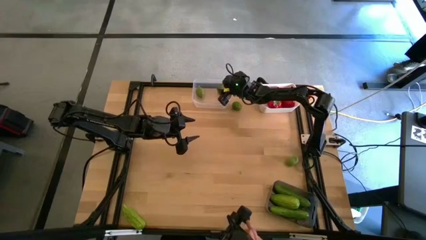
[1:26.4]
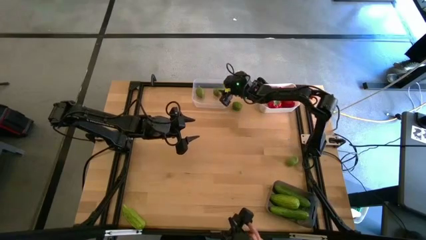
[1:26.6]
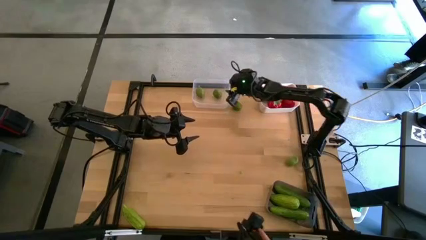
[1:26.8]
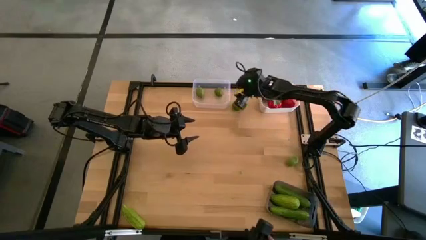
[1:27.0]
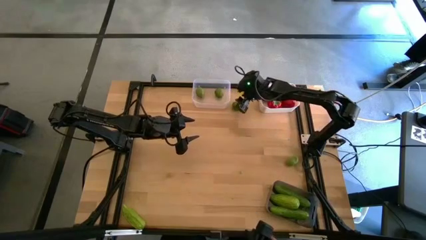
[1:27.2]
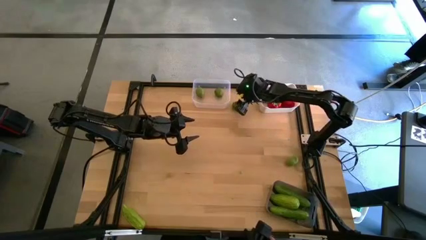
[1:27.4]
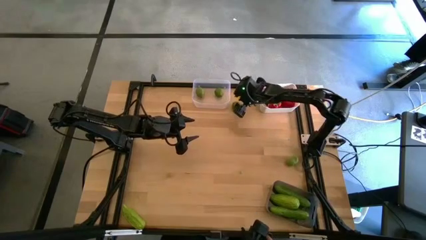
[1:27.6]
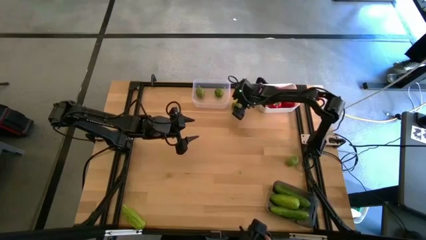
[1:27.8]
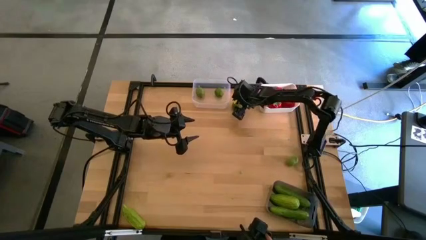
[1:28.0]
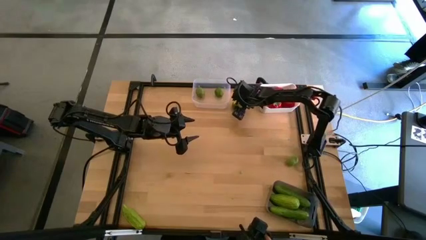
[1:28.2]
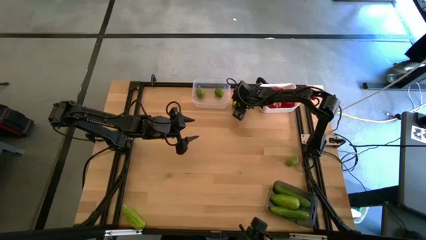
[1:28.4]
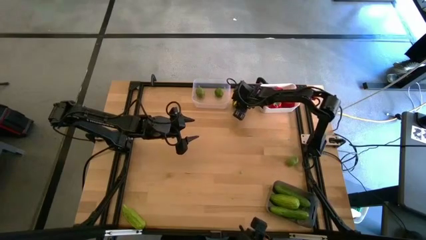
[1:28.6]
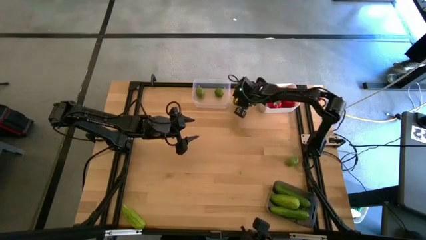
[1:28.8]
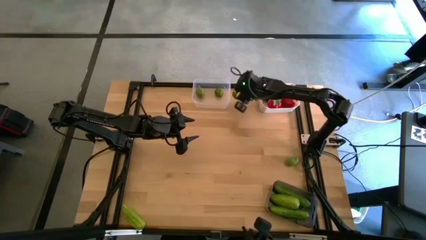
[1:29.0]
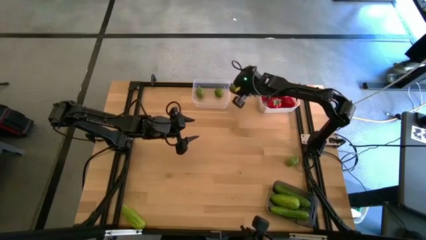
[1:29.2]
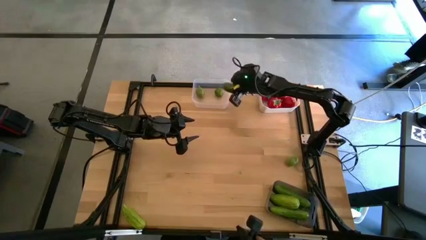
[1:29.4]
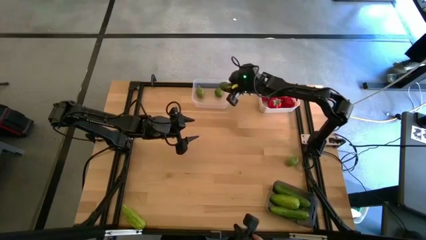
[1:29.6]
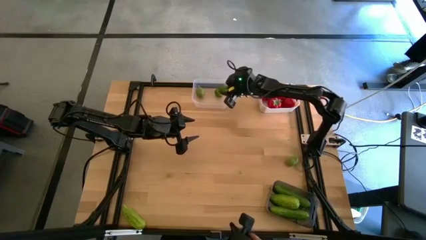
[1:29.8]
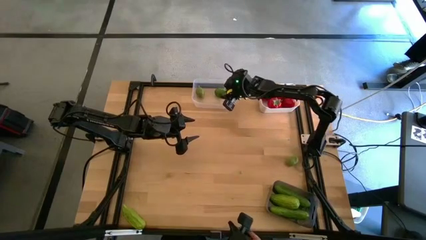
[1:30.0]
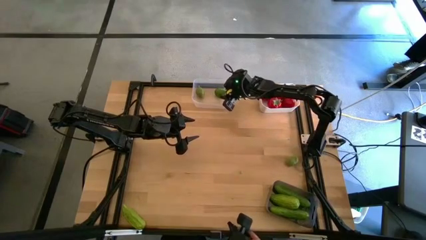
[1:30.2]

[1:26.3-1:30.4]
Task: Sort produce into baskets
Put the green lime into the transparent bin

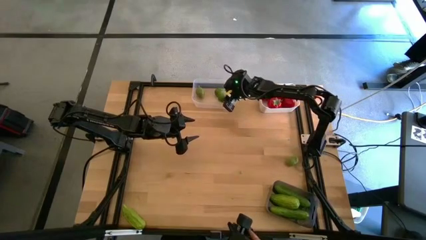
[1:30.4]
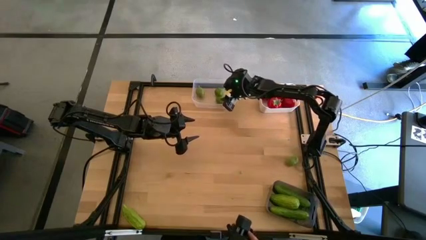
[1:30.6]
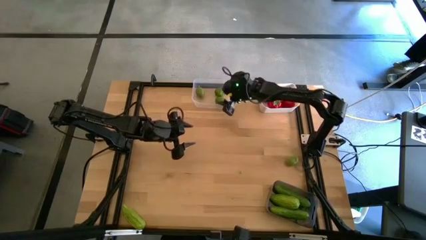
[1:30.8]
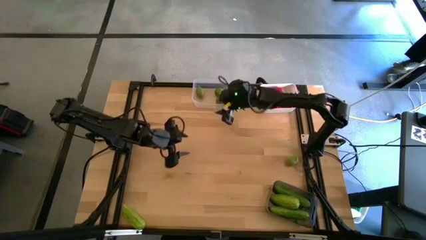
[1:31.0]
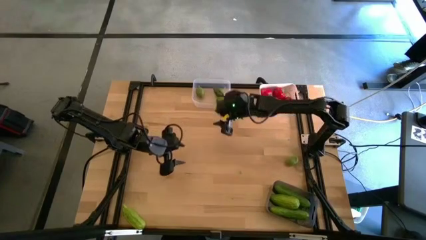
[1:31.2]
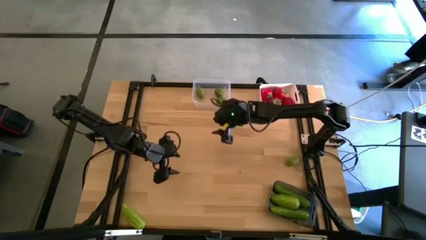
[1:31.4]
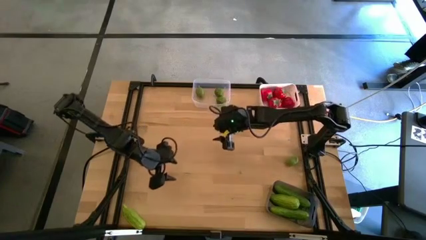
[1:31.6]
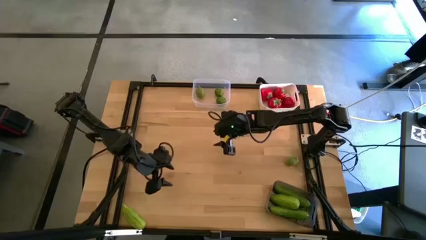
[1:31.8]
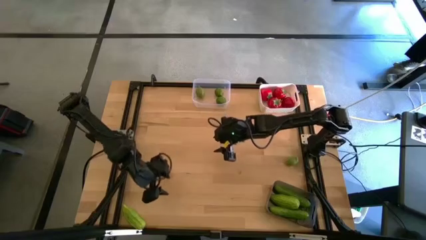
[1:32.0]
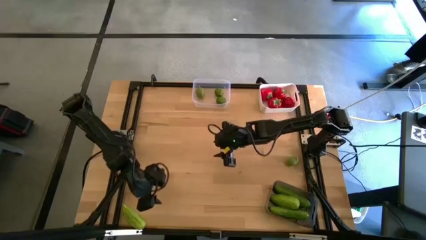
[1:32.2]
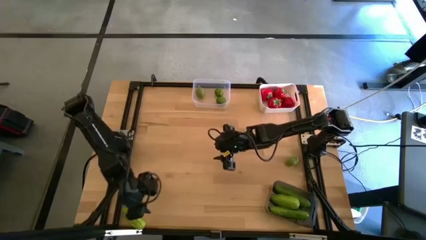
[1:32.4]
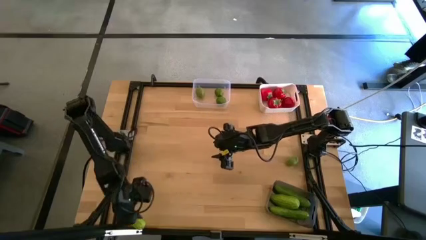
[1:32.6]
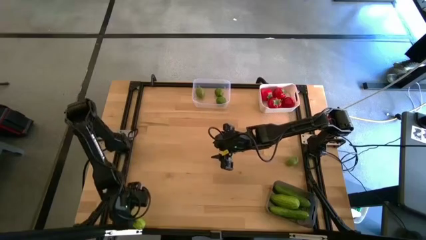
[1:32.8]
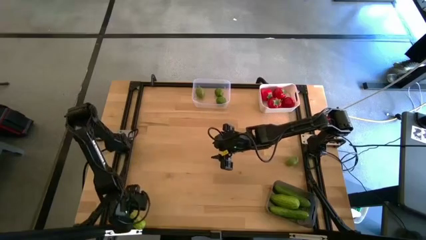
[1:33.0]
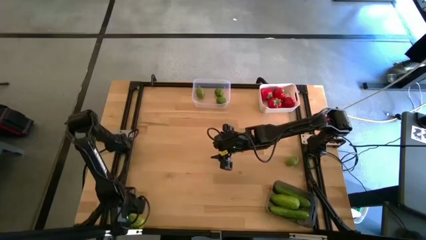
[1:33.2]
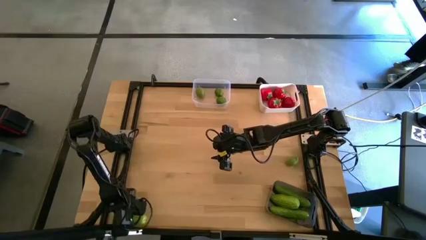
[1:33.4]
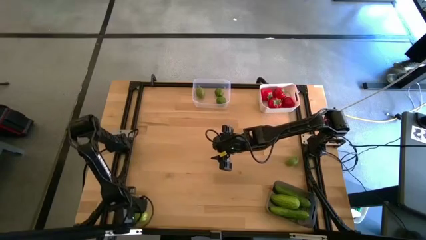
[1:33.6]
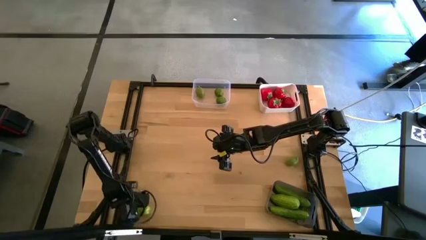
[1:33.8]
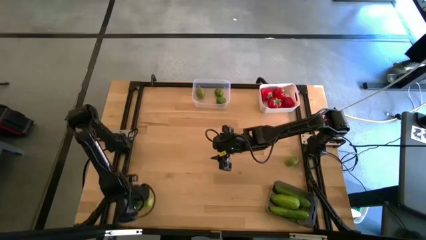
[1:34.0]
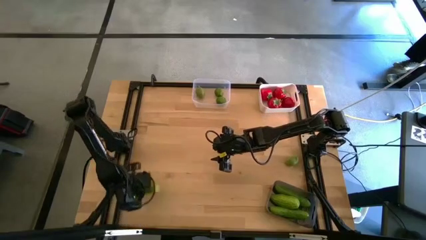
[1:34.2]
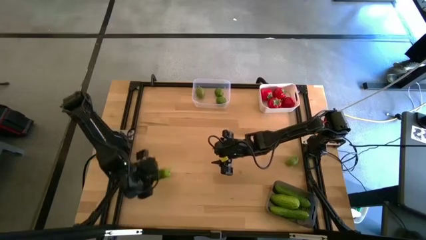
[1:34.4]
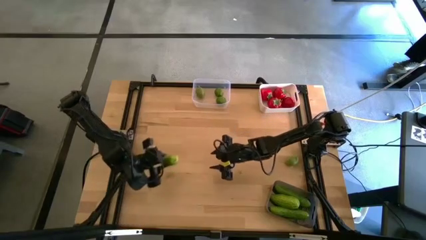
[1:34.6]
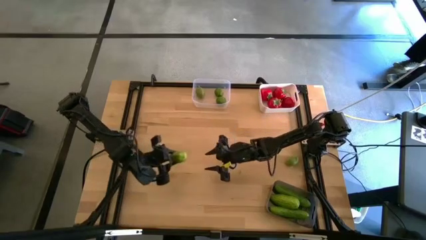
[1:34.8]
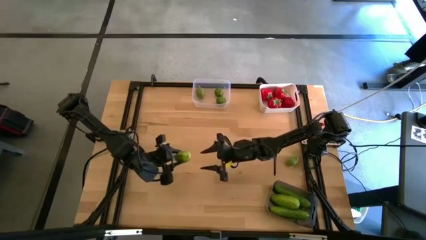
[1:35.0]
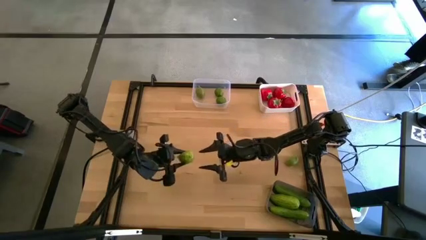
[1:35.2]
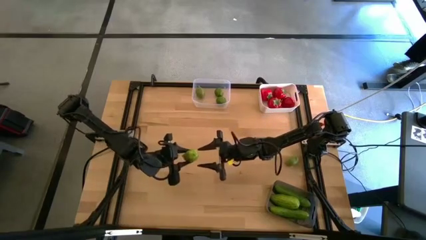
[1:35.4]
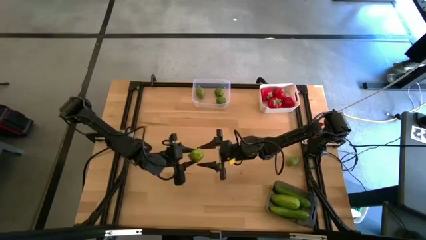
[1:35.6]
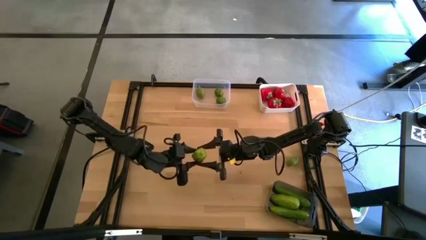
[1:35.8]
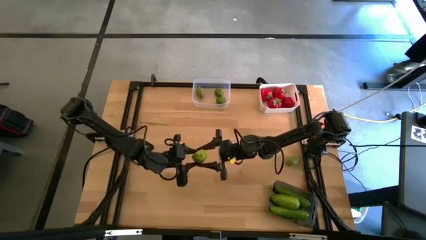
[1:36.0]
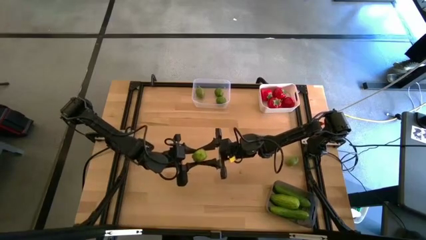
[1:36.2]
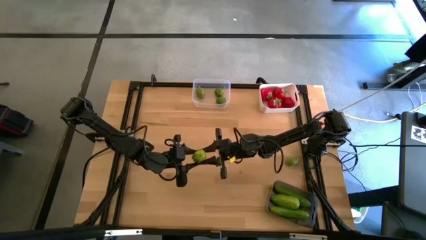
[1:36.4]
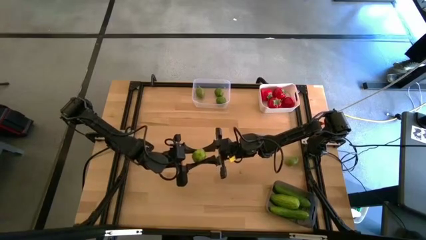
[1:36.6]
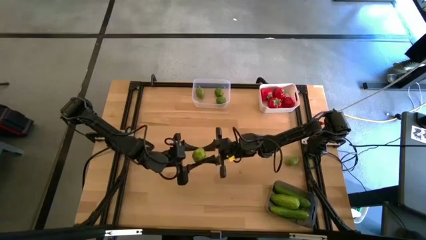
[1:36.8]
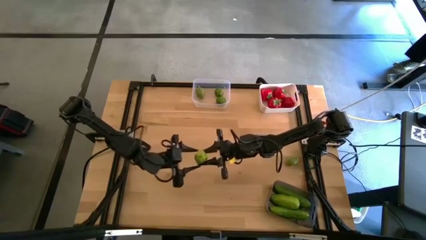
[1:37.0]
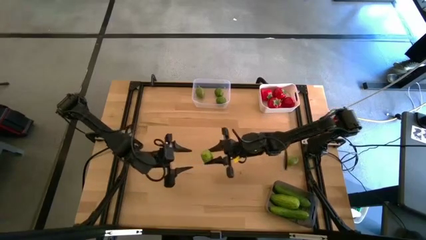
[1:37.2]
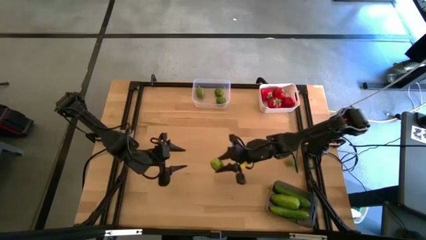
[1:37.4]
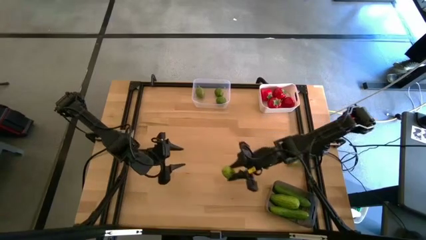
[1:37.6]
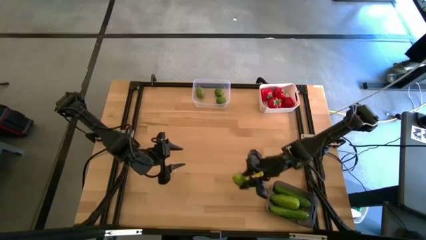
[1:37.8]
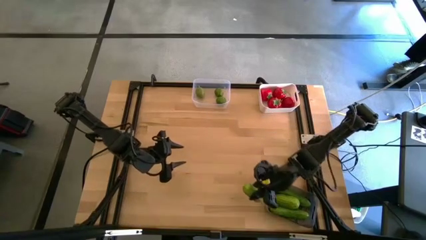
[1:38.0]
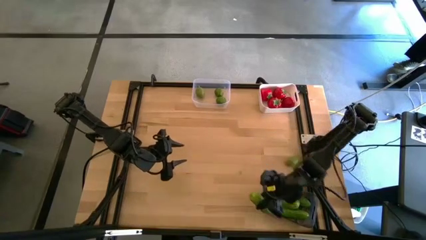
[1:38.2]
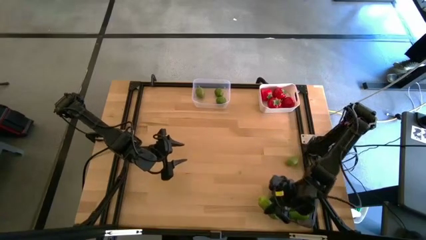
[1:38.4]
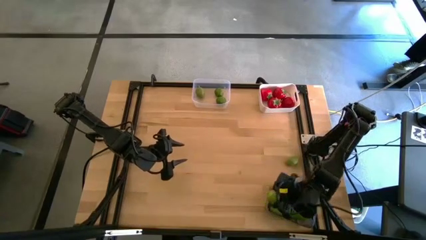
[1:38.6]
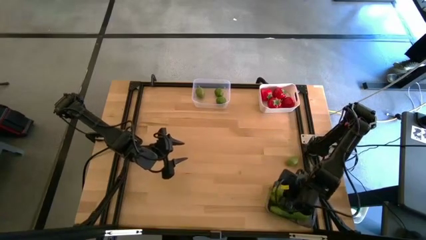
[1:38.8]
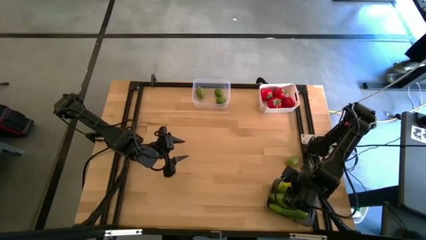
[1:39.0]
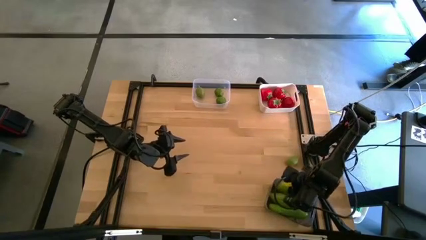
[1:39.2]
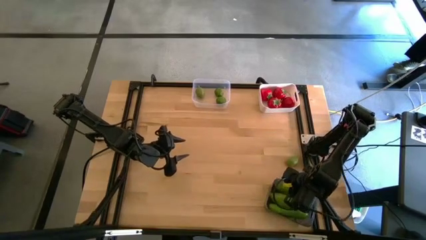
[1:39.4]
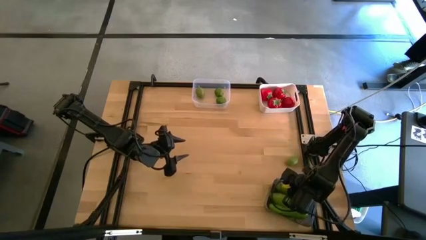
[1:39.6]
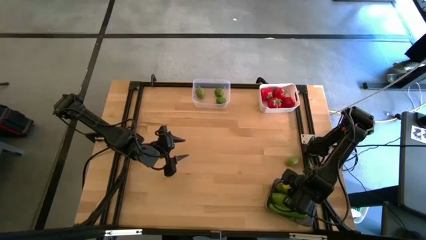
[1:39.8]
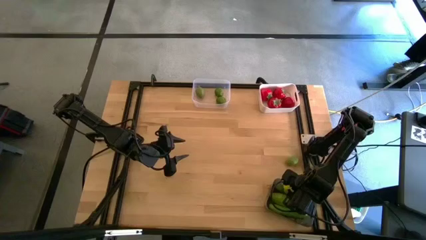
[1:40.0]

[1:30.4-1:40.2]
Put the green cucumber into the black bin

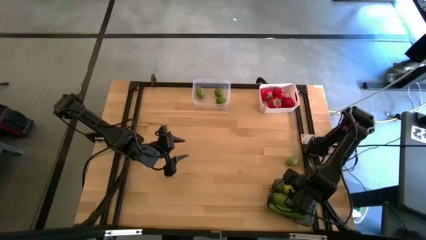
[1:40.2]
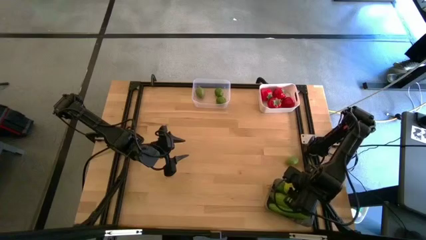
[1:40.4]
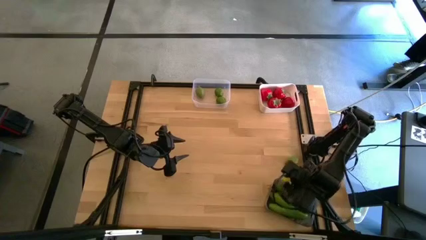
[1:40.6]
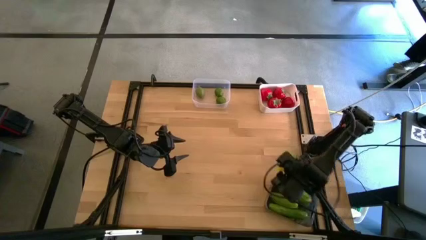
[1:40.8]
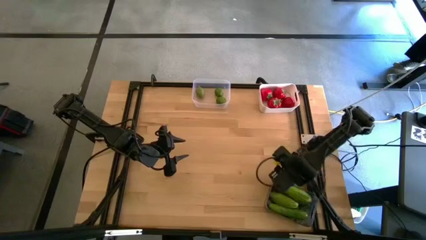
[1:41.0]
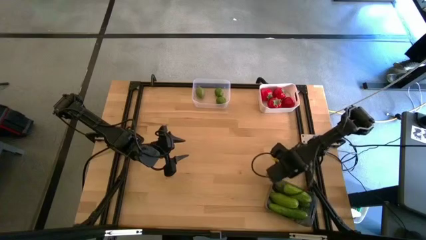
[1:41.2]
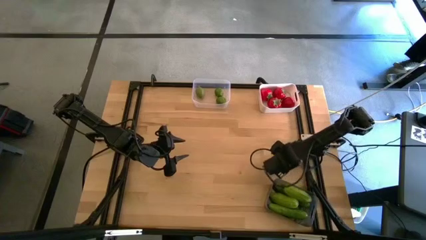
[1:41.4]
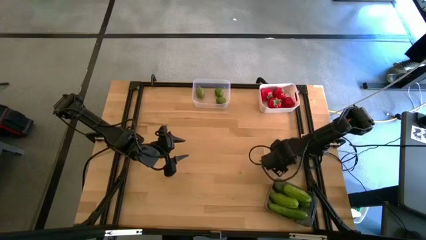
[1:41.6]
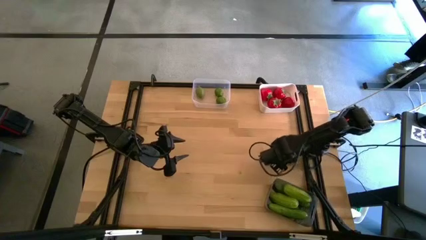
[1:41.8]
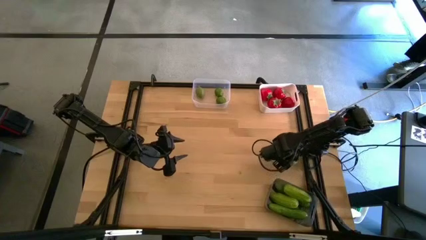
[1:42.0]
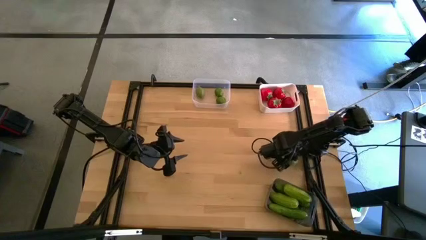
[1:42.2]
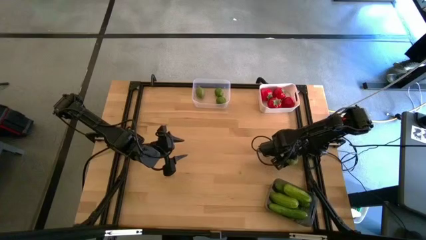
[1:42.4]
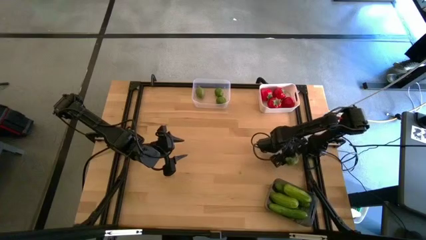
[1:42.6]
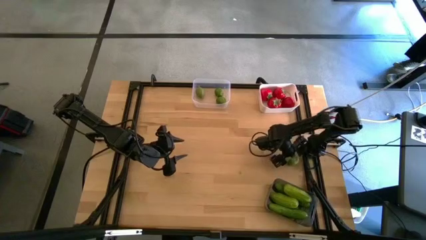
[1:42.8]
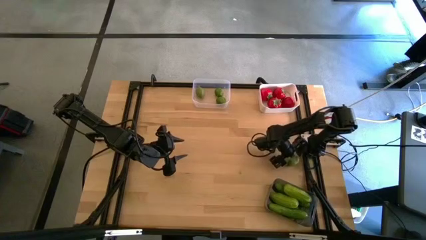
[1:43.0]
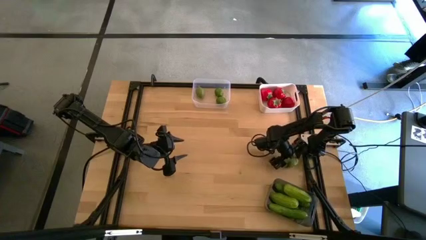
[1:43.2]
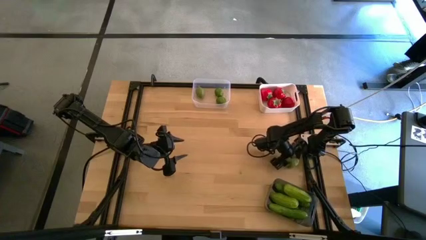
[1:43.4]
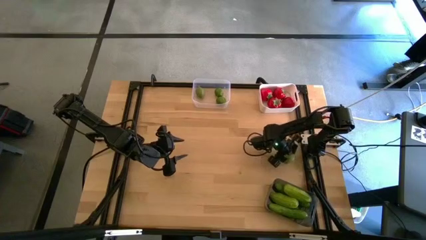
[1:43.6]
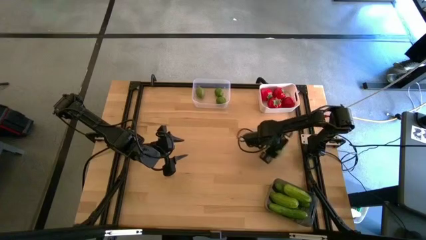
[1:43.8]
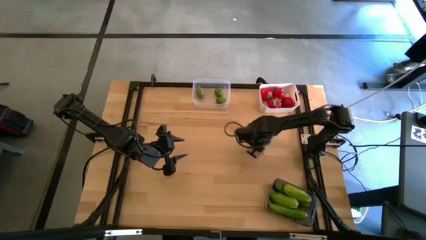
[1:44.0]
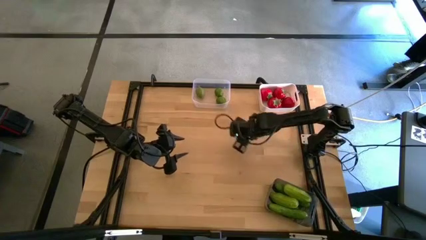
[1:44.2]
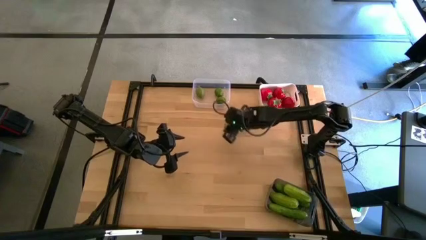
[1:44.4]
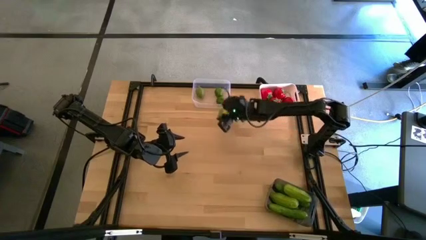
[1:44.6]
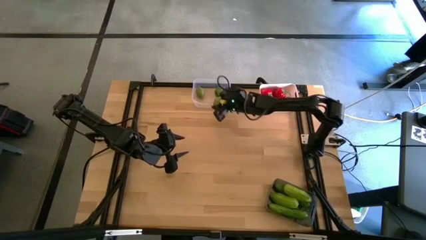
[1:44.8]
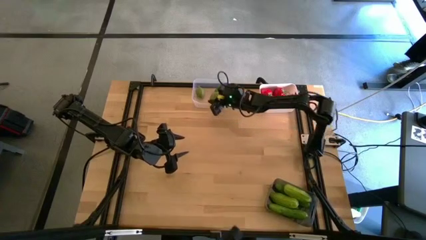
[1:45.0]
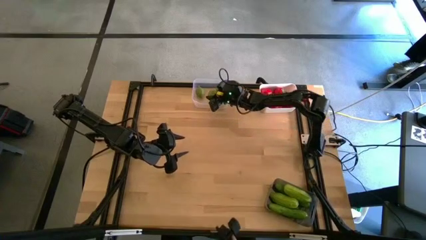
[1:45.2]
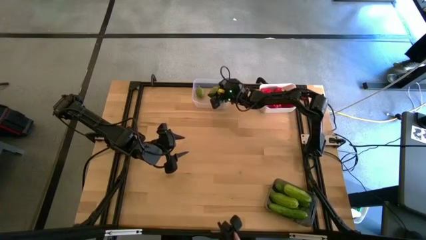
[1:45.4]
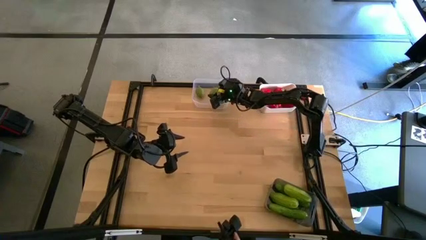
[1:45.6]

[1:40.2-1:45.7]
Put the green lime into the transparent bin
